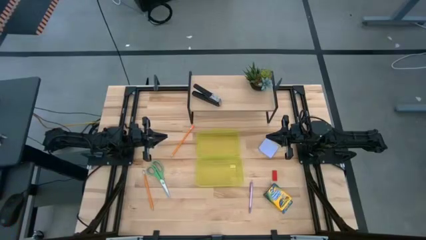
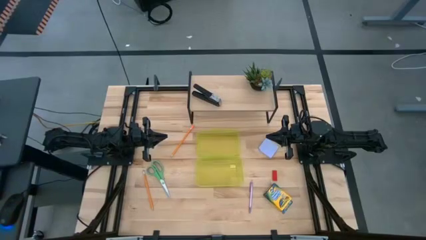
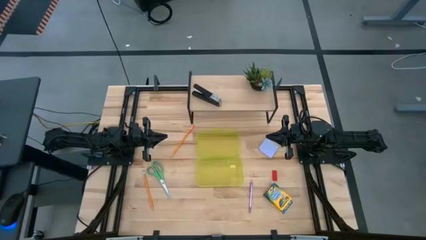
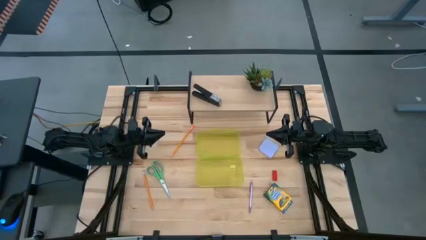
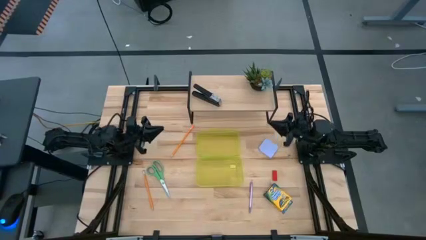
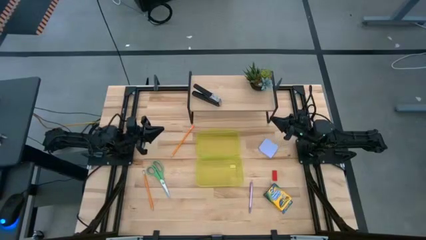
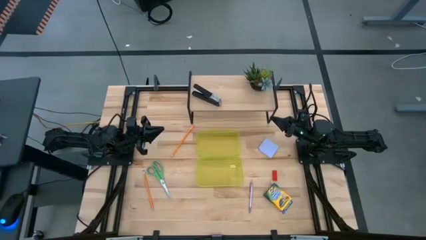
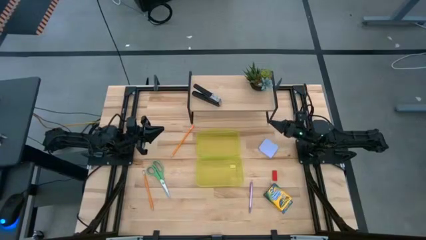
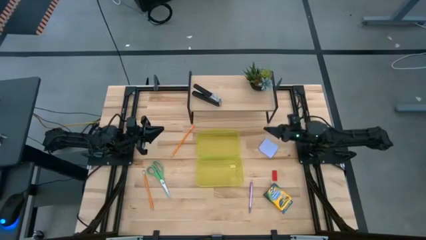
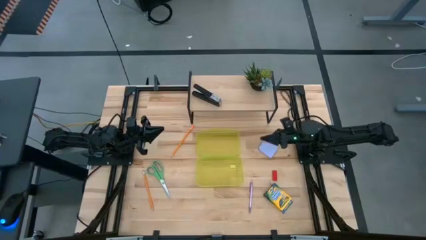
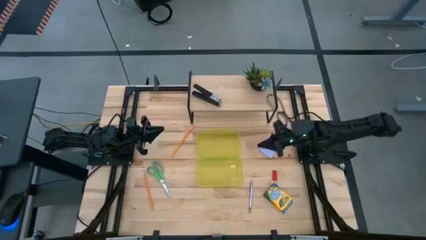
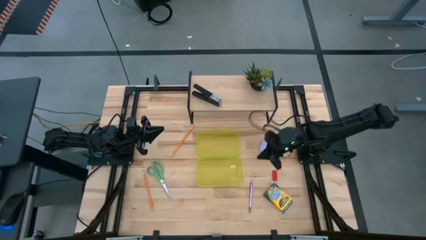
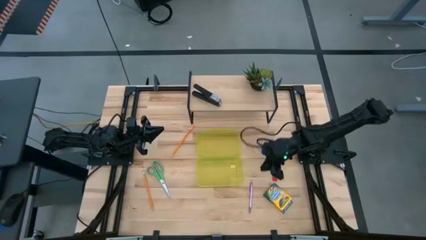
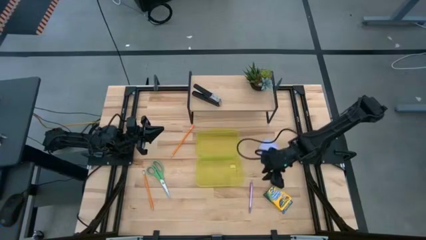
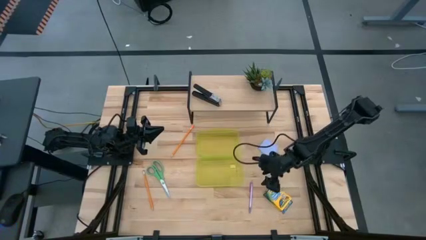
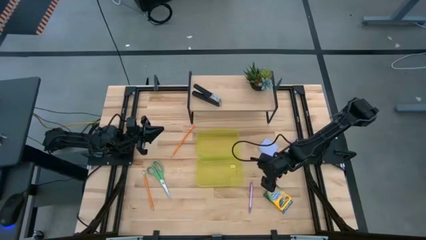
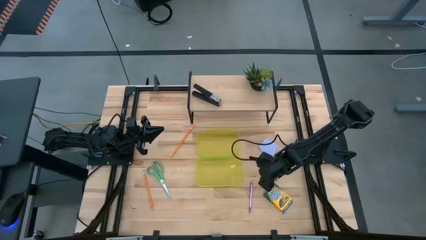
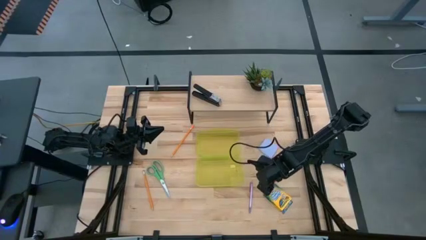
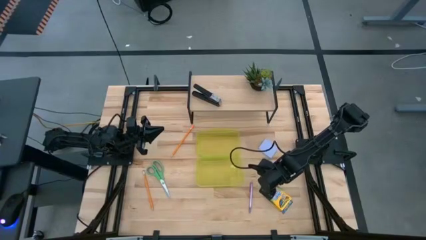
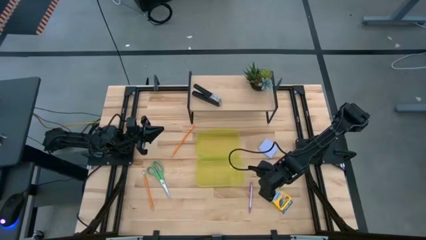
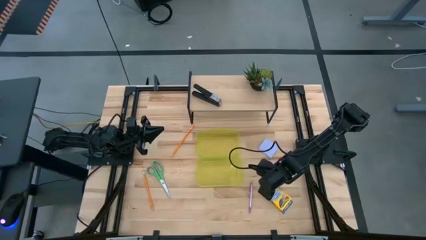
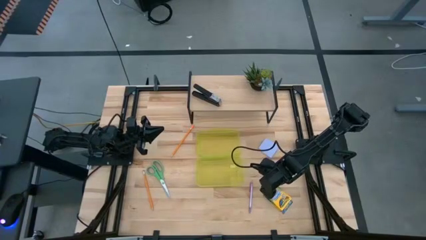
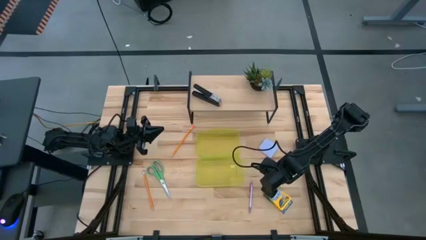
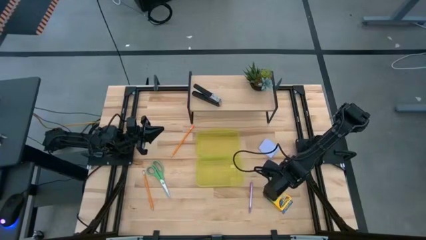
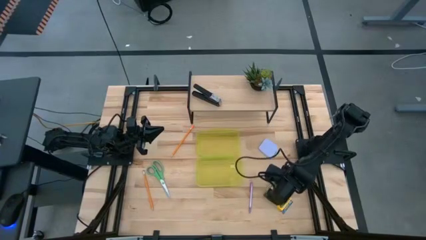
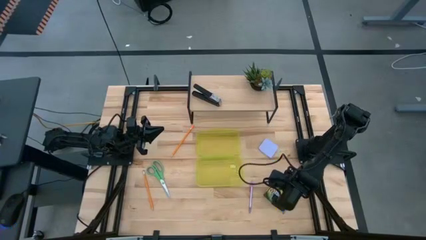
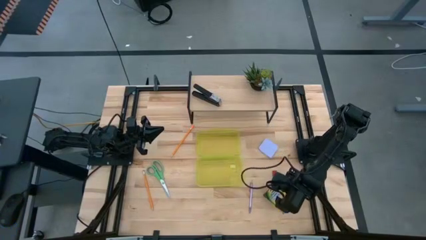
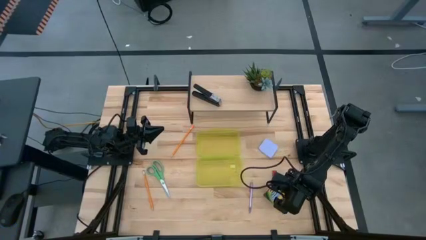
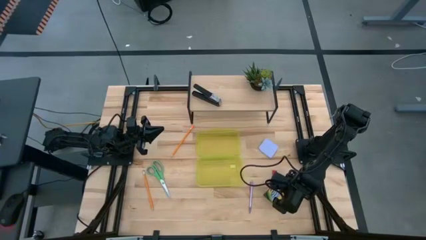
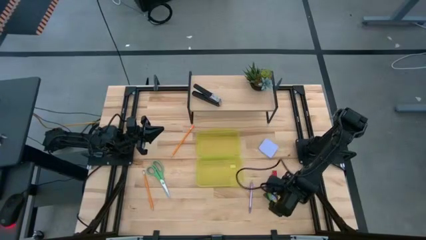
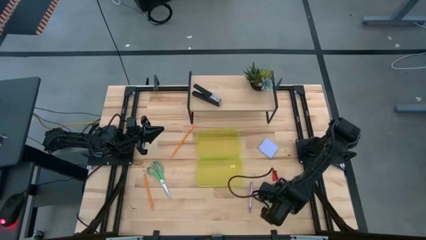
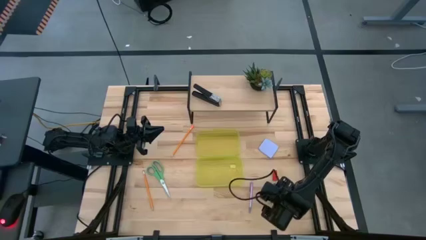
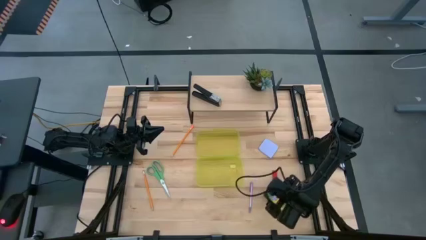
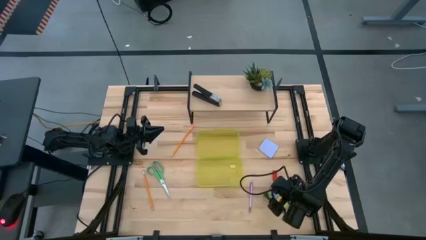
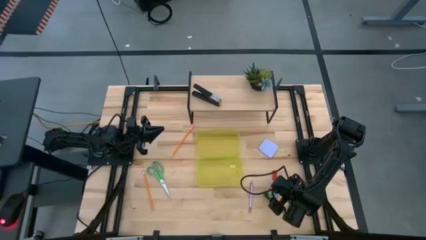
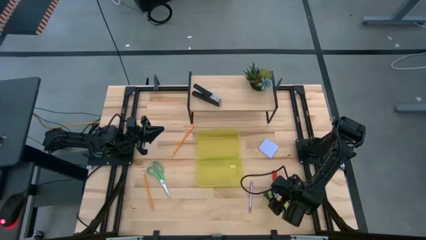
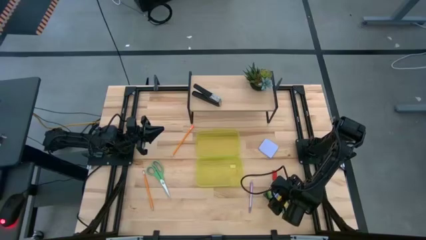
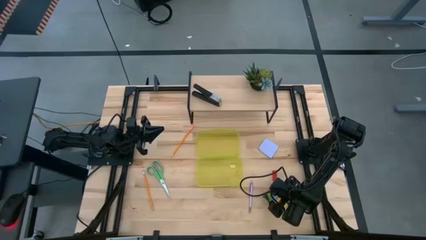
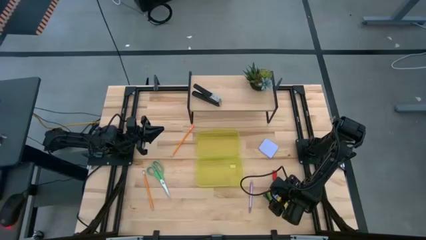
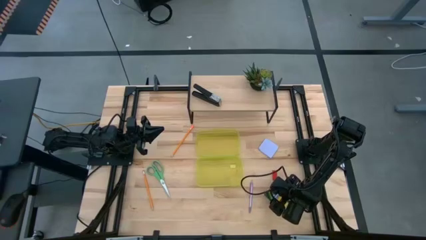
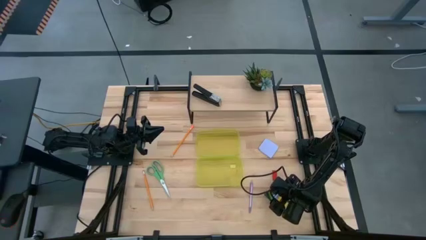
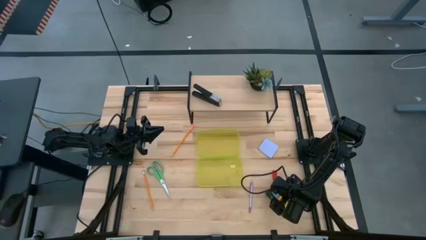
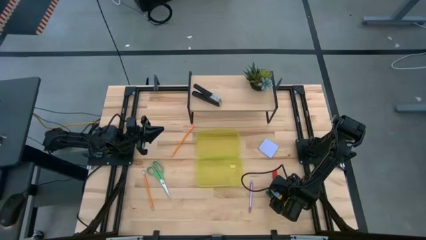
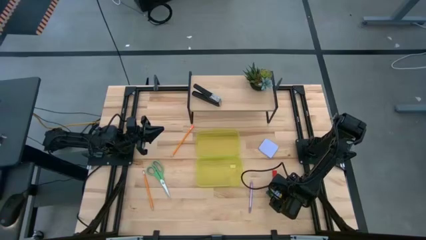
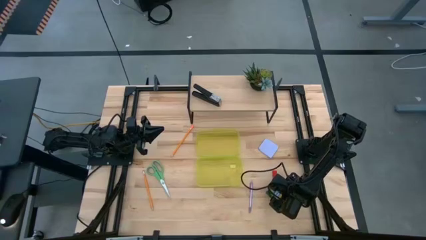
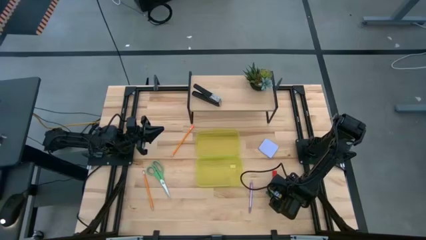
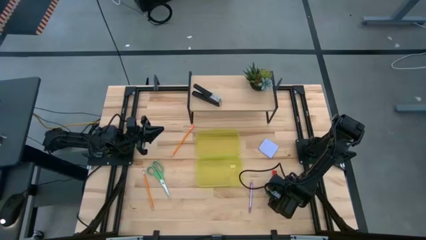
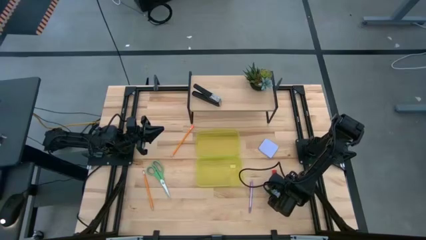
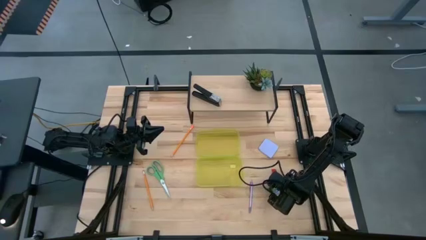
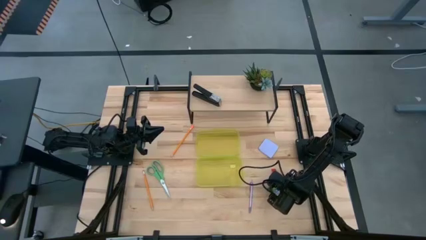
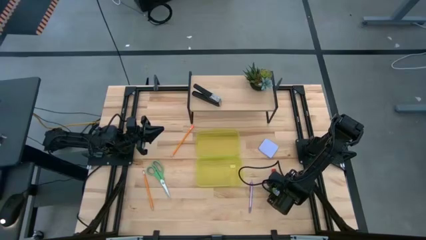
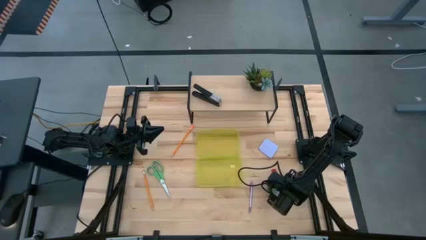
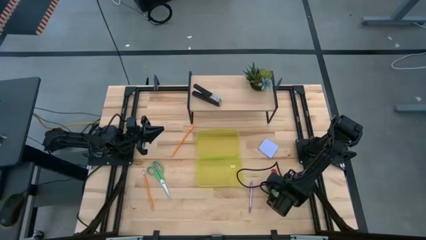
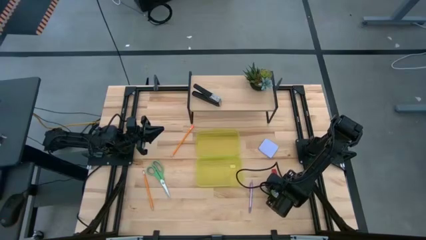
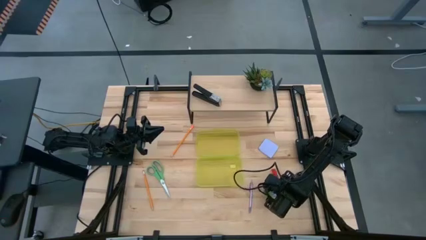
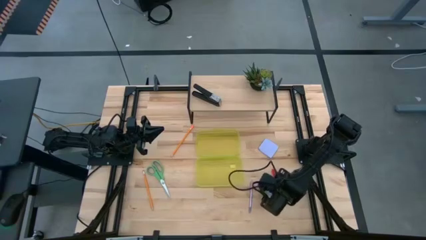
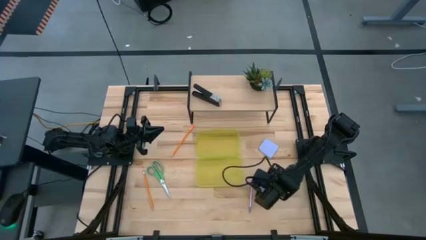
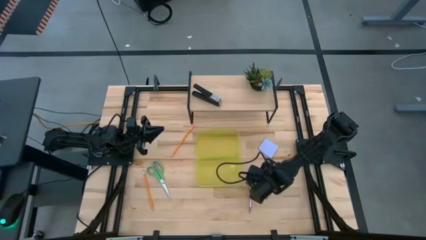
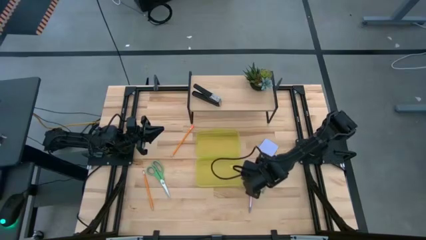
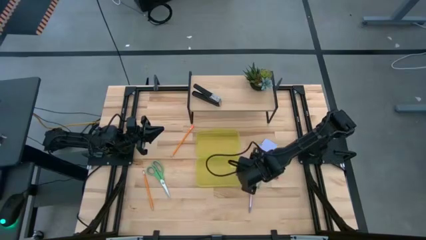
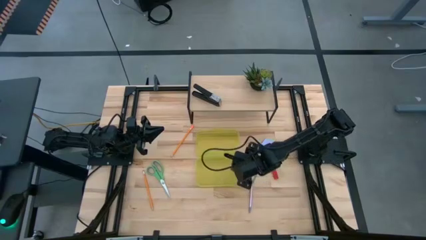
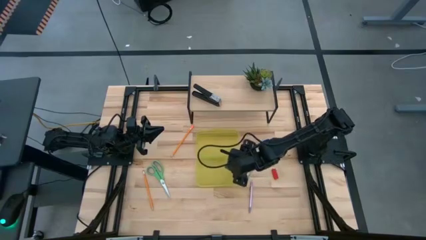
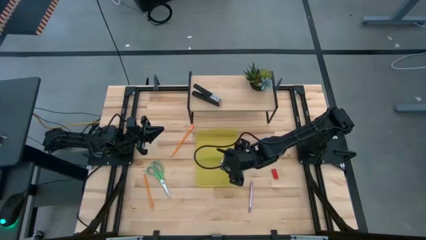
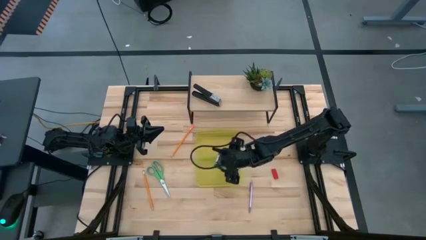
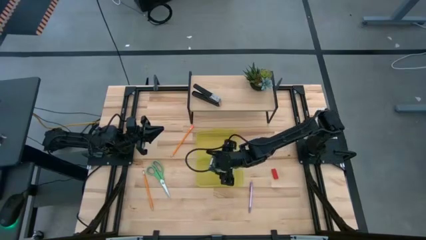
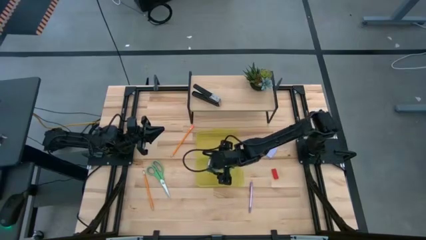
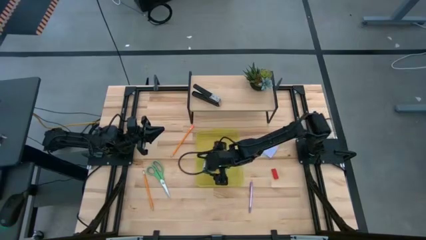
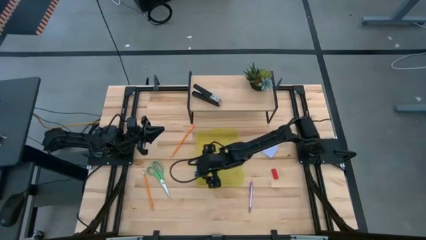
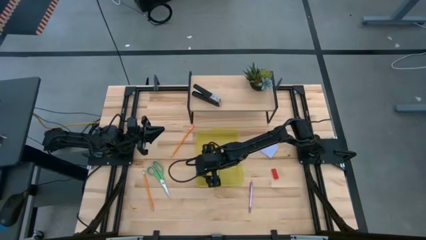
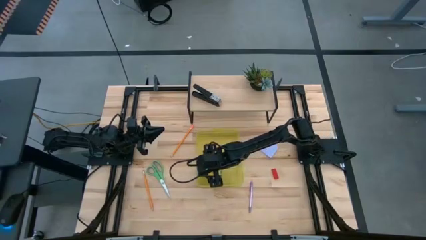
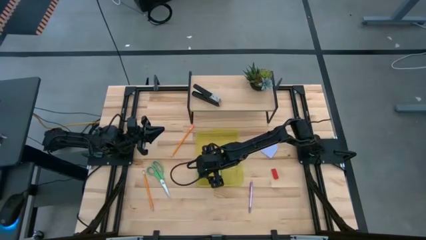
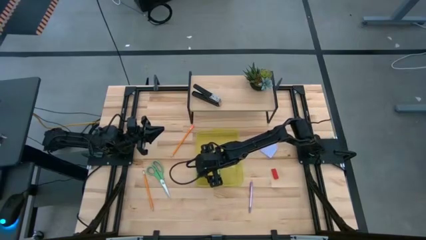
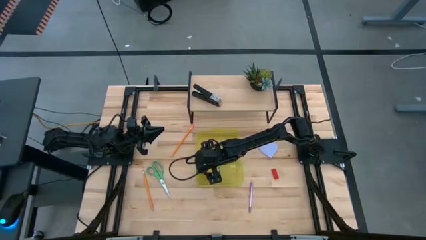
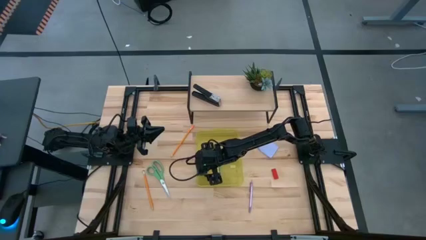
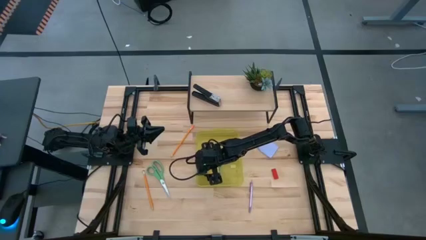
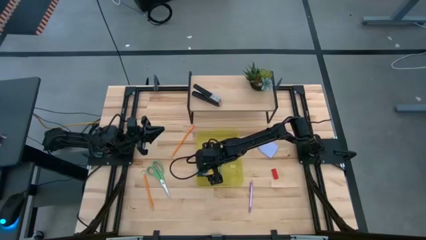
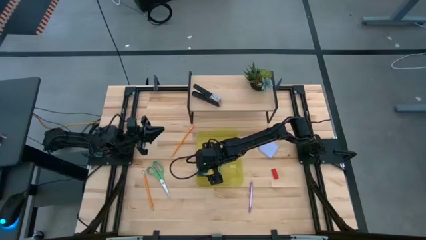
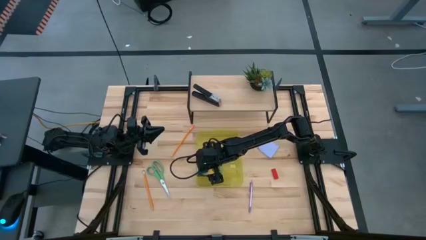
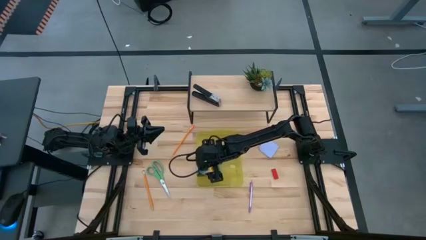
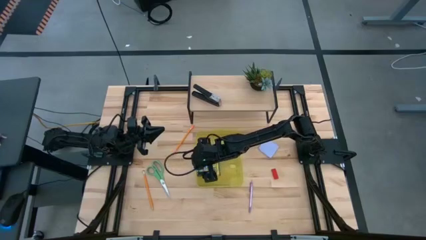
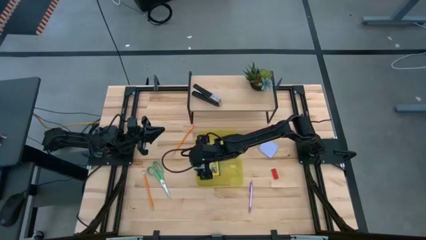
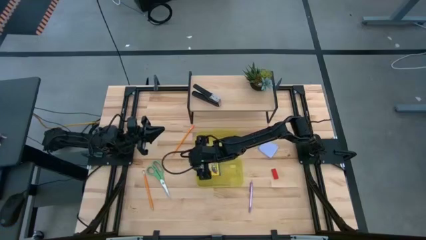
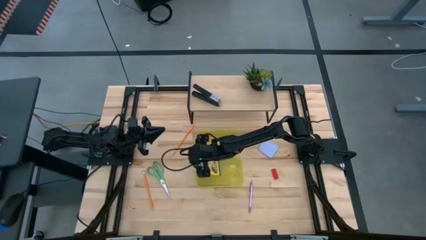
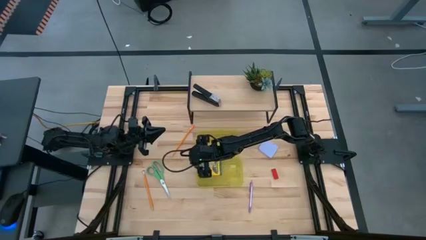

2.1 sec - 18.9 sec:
Task: Pack school essentials
Put the crayon box into the yellow supply box
